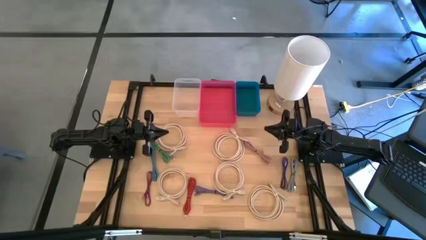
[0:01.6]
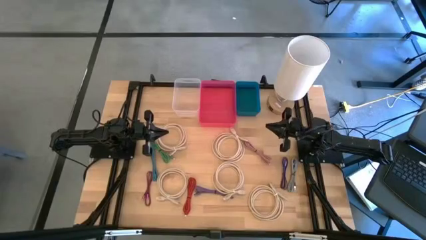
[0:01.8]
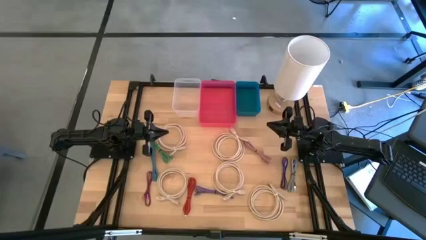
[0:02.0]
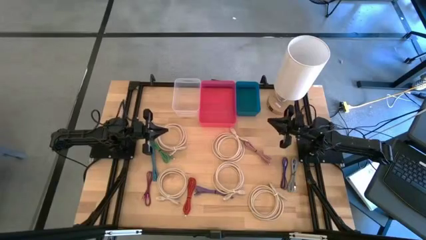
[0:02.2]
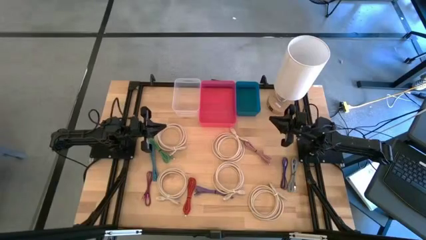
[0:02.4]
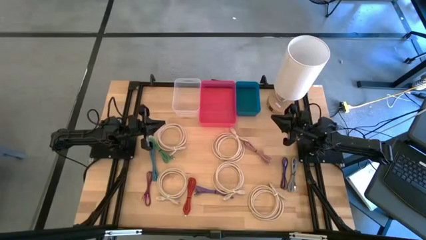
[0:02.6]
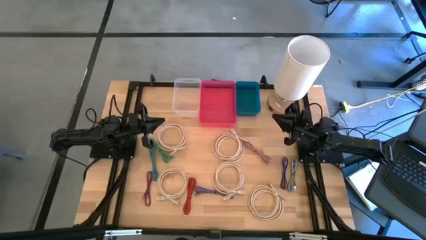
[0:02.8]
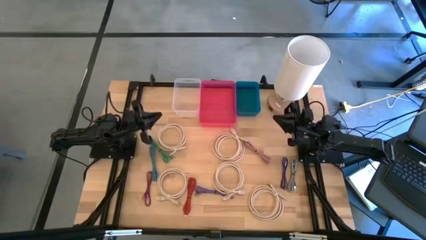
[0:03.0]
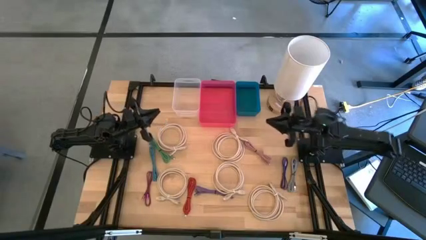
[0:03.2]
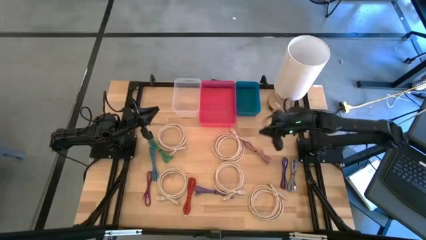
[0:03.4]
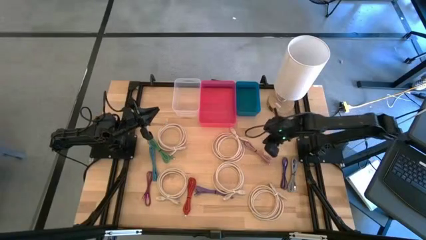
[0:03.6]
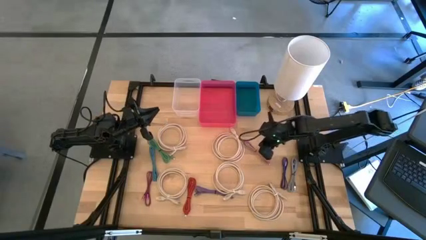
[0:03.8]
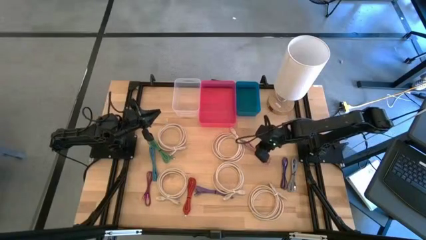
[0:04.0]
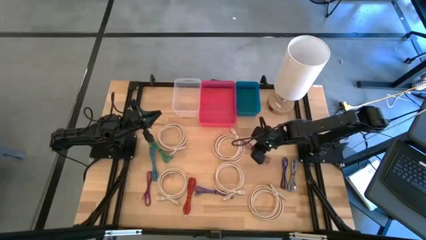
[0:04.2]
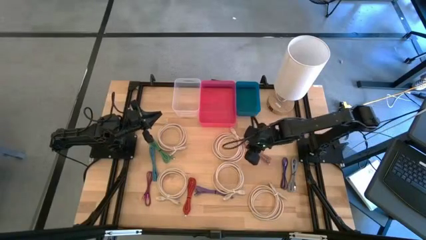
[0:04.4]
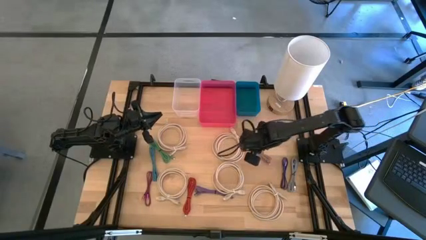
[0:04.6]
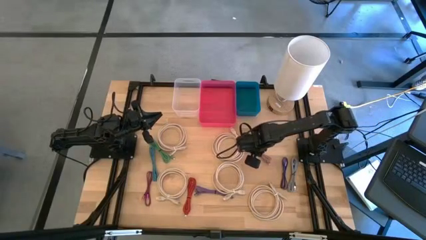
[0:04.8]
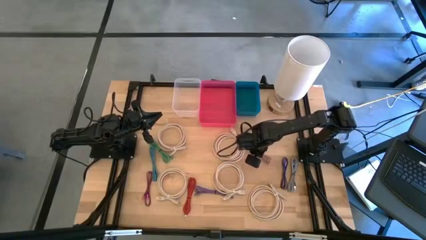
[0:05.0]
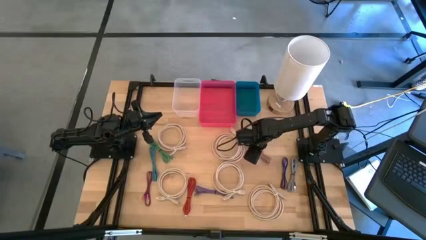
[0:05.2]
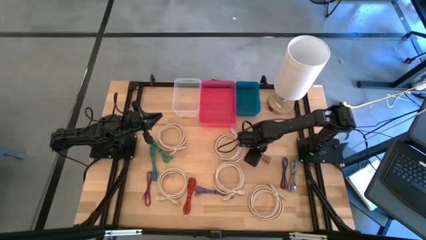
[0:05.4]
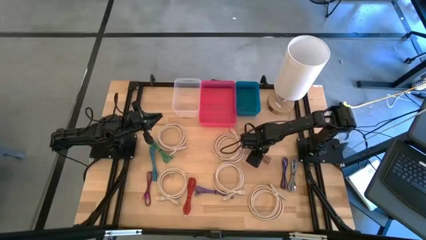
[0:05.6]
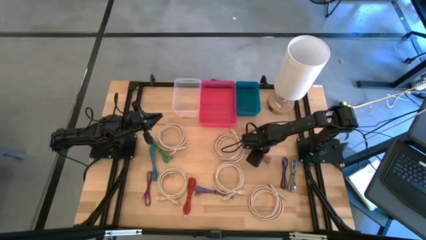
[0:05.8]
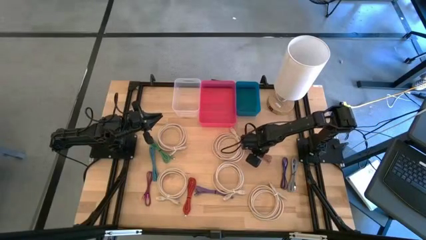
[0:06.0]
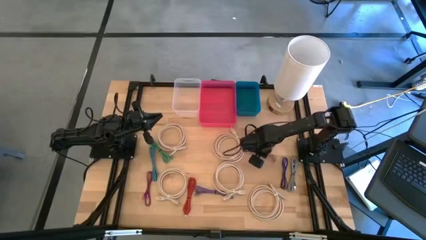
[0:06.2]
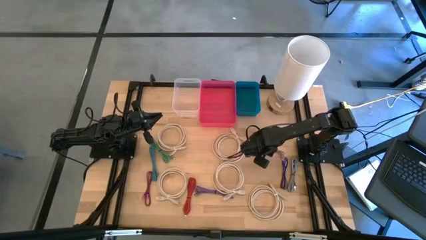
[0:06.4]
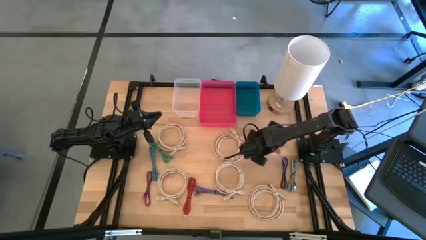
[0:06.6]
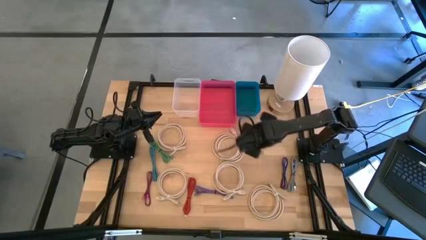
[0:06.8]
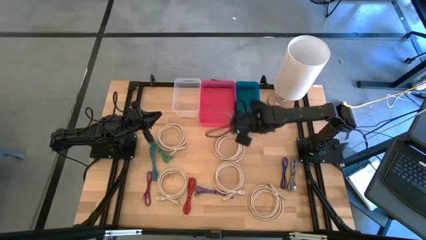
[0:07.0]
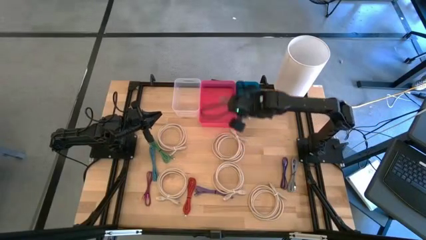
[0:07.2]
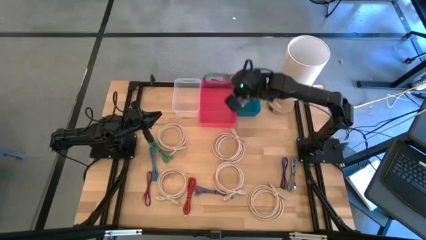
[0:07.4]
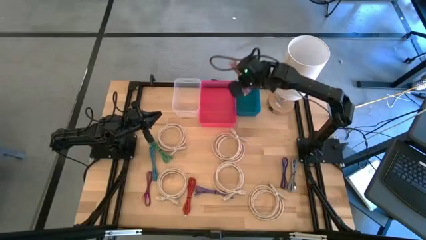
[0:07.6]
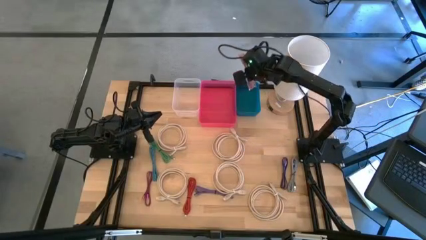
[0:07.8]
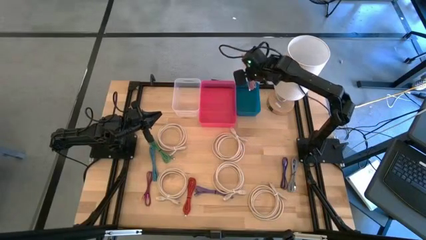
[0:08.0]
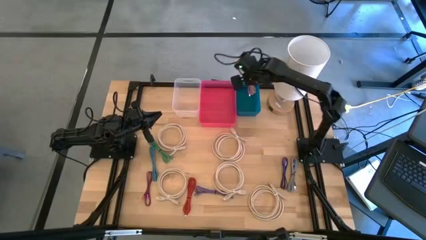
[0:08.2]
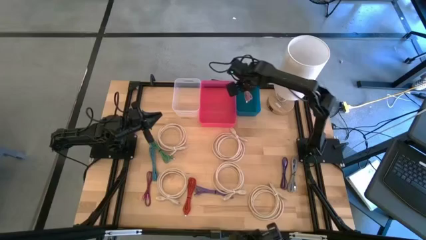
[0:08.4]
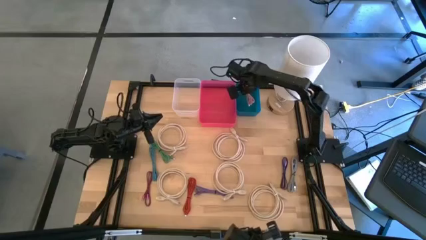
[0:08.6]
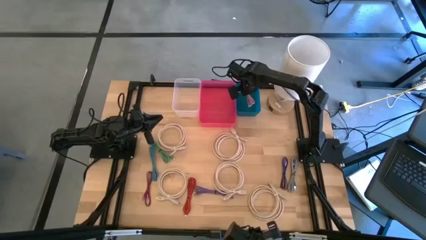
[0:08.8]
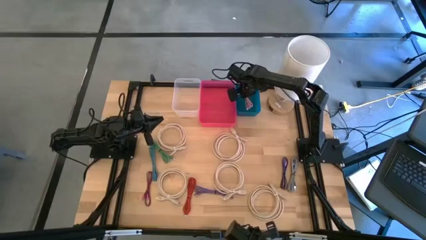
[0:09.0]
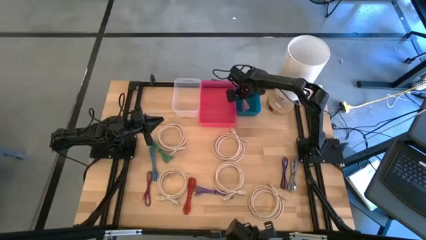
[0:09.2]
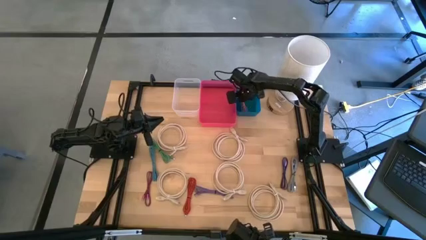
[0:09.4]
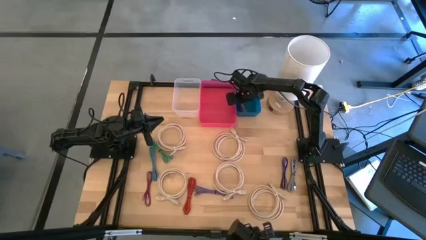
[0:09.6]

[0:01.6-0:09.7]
Task: Pick & Place USB Port
Put the pink USB cable into the blue bin

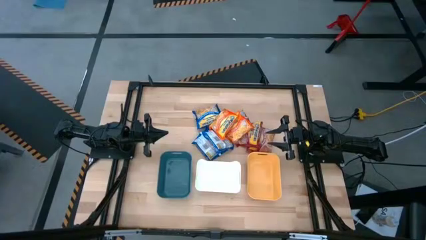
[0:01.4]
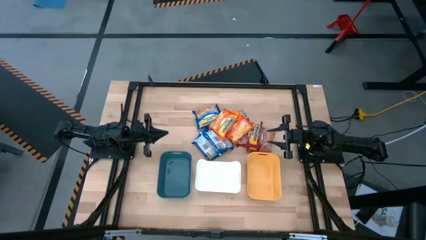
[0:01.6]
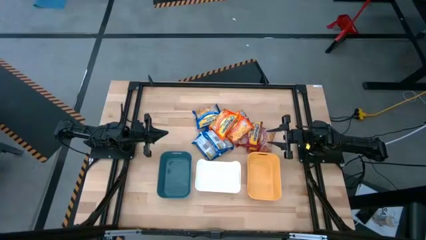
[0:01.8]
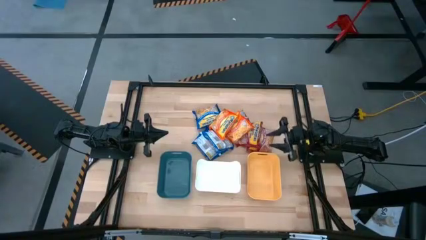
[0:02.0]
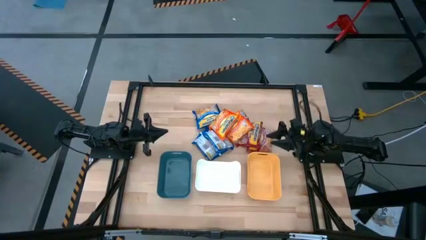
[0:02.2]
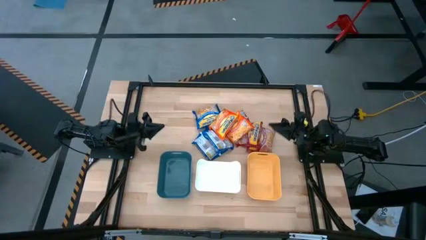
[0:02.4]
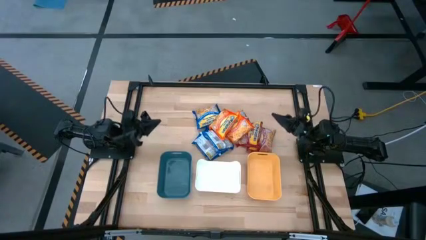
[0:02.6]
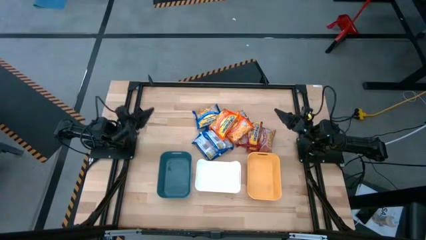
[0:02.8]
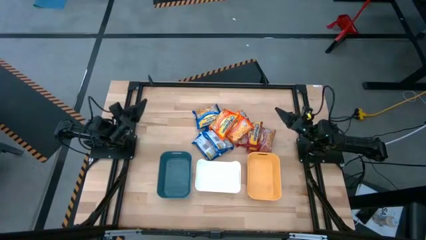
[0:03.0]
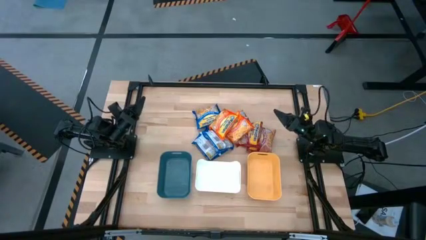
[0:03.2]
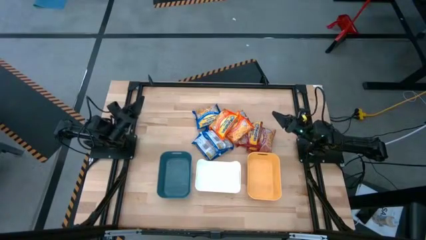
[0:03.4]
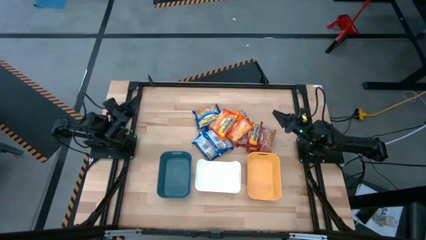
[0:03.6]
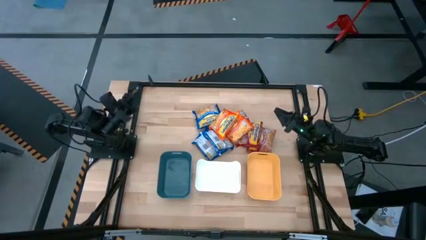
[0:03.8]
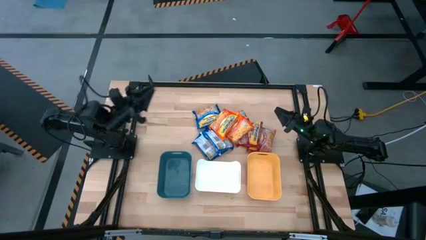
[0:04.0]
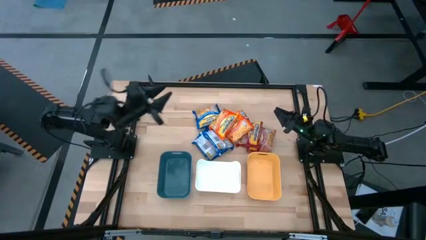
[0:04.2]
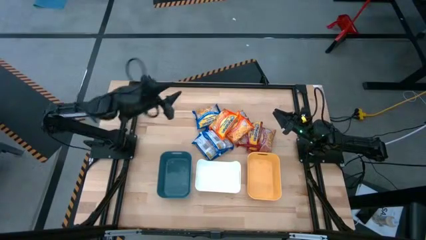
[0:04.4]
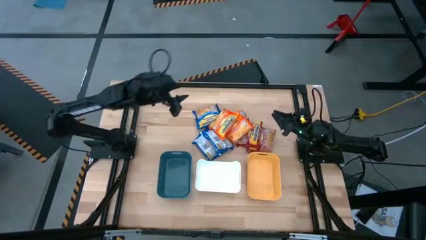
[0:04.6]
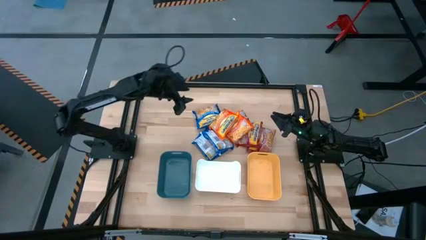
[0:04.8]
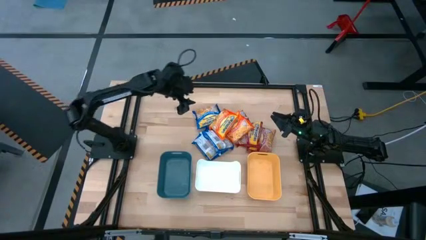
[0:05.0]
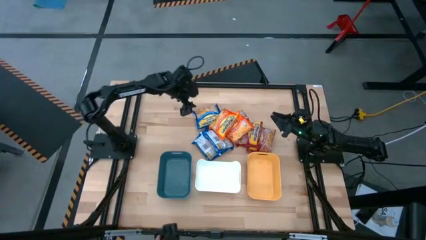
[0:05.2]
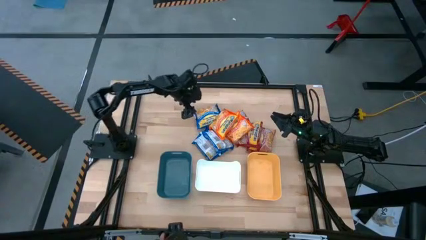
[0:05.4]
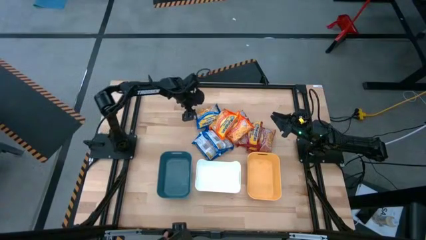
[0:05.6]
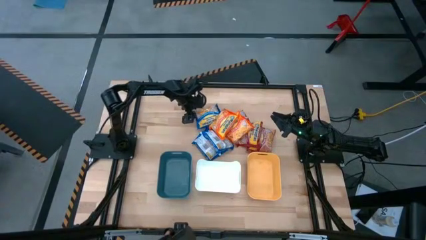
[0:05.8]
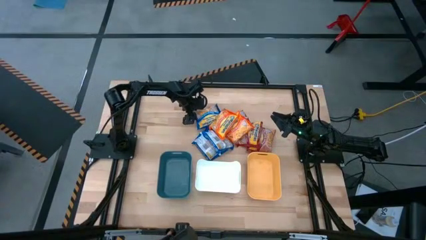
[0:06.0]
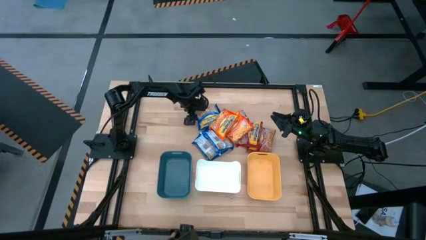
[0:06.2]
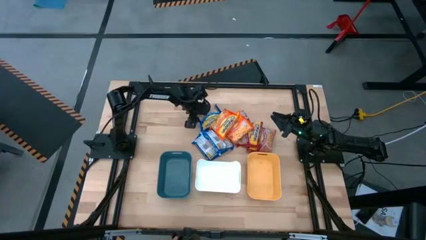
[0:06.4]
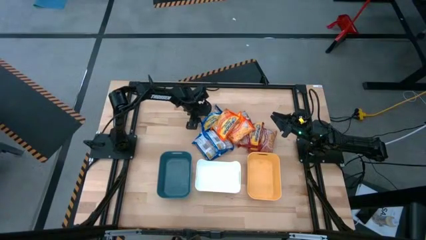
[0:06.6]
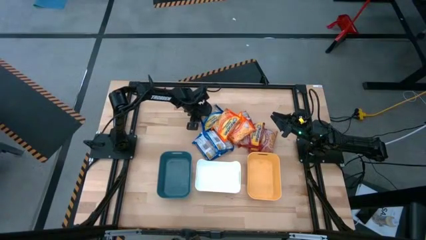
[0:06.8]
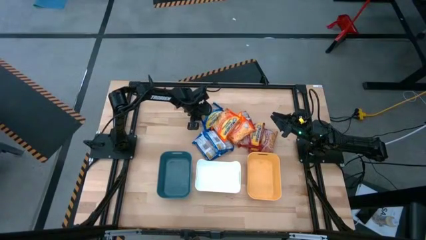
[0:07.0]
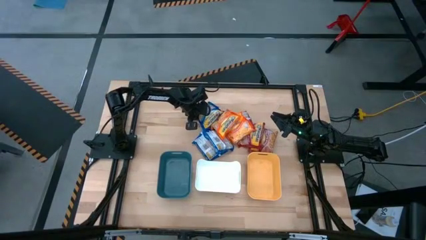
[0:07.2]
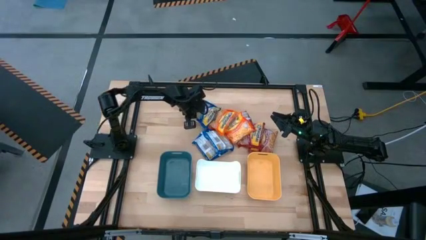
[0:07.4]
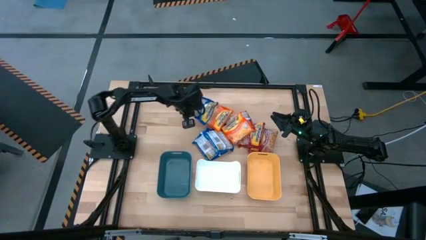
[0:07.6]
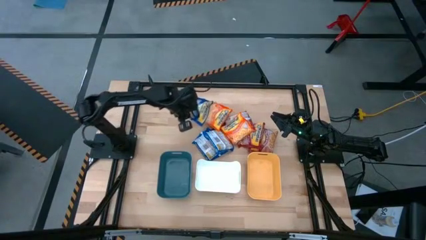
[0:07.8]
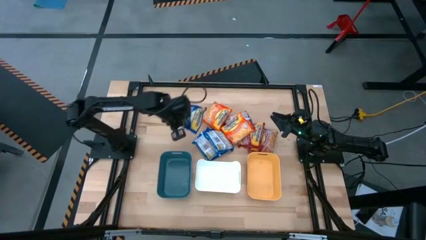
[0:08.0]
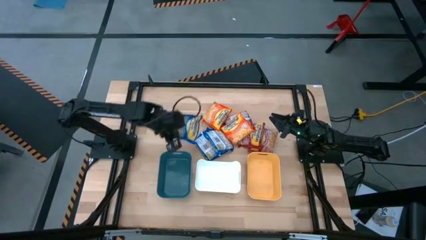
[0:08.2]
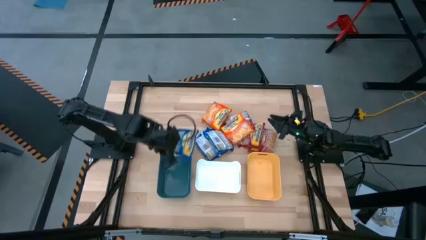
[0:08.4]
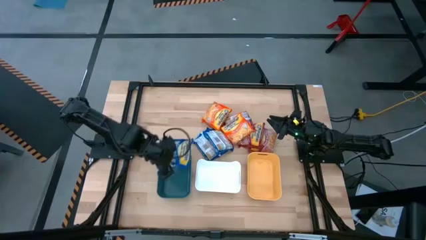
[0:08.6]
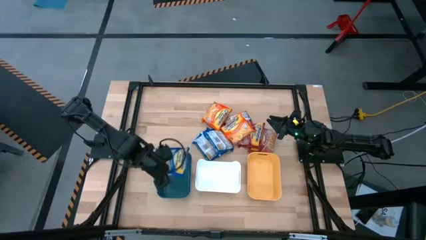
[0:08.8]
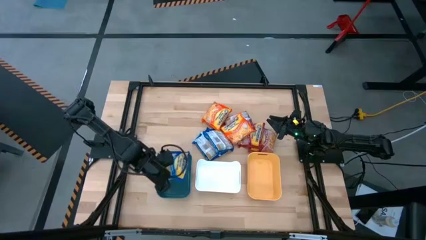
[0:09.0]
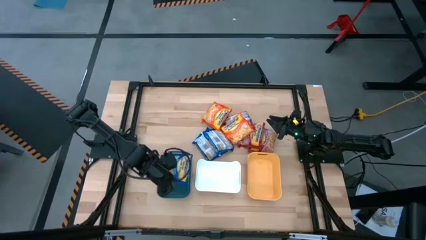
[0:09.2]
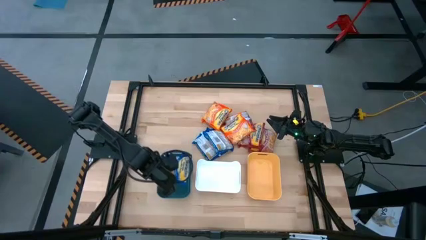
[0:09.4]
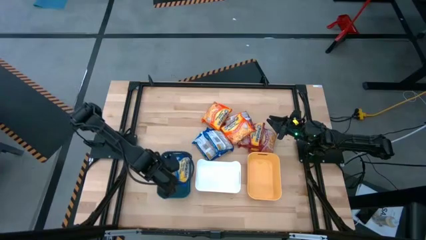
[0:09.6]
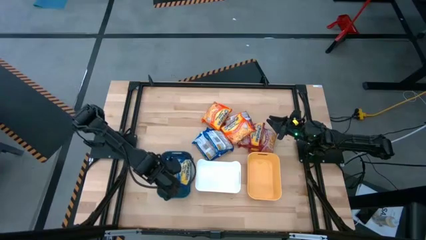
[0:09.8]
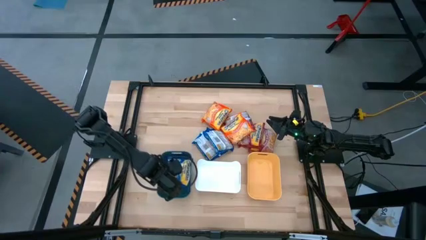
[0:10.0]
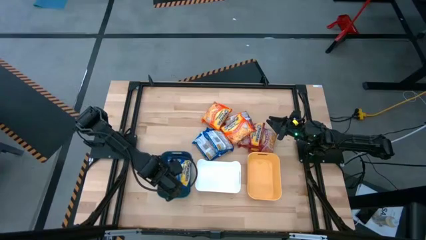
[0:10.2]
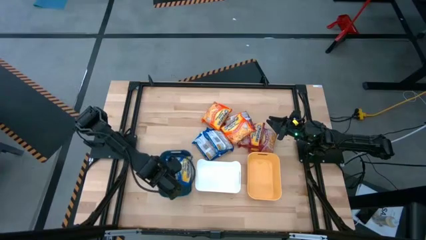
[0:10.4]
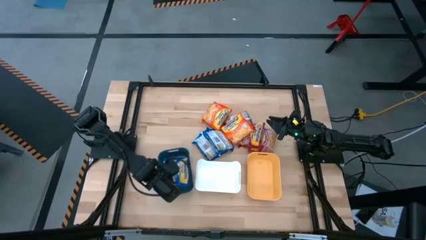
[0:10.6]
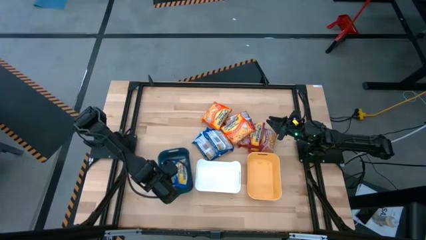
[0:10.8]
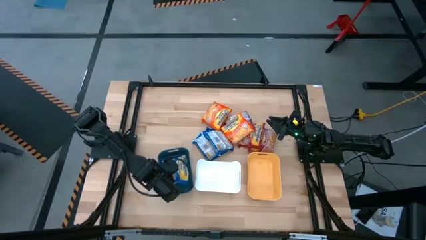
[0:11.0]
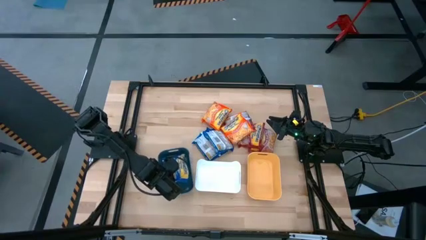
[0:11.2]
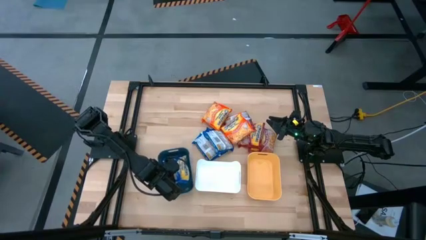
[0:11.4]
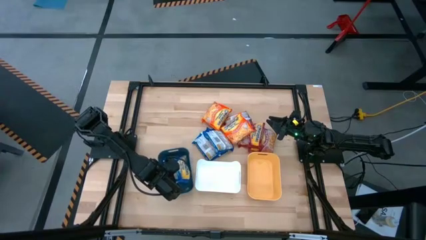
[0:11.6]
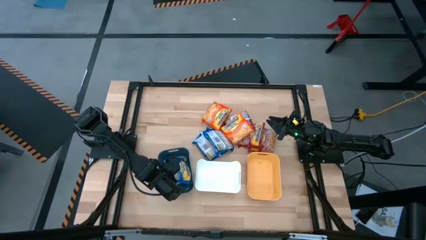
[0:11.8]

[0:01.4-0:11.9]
Task: Sort Maruchan noodles
Put the top blue noodle pack into the blue bin
